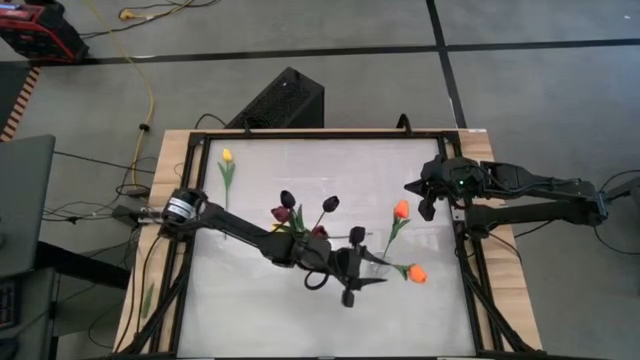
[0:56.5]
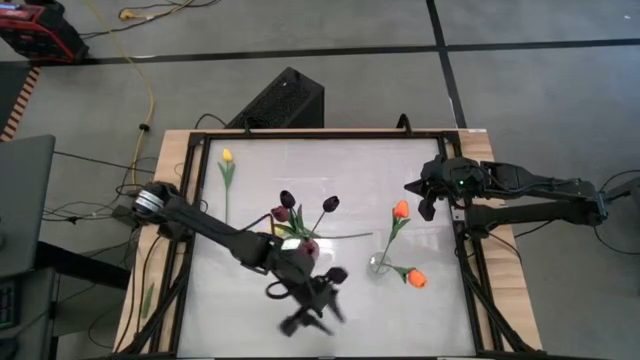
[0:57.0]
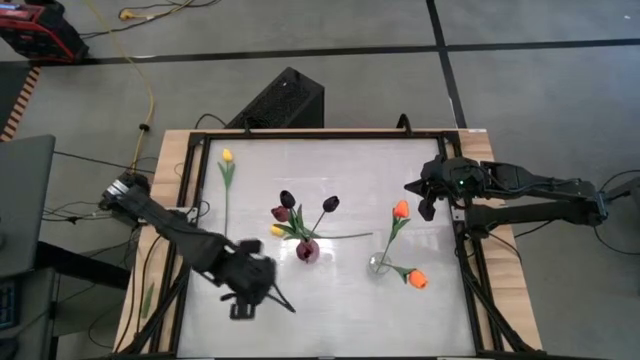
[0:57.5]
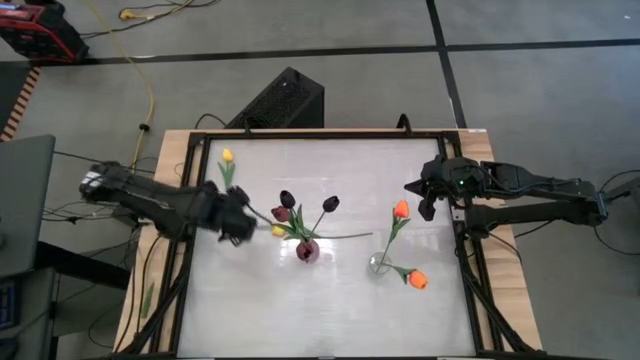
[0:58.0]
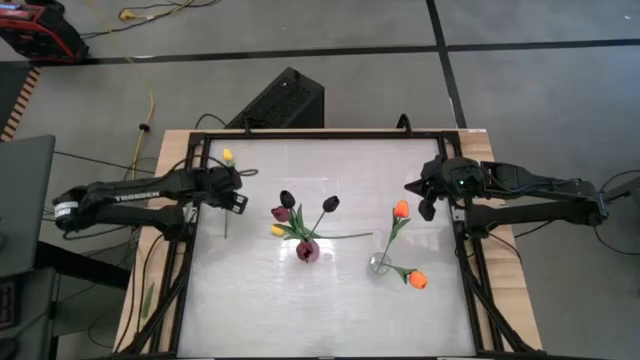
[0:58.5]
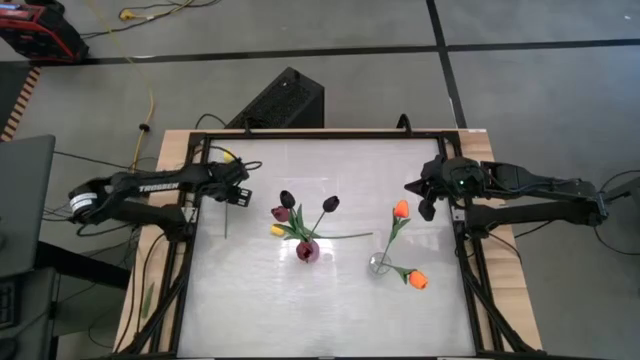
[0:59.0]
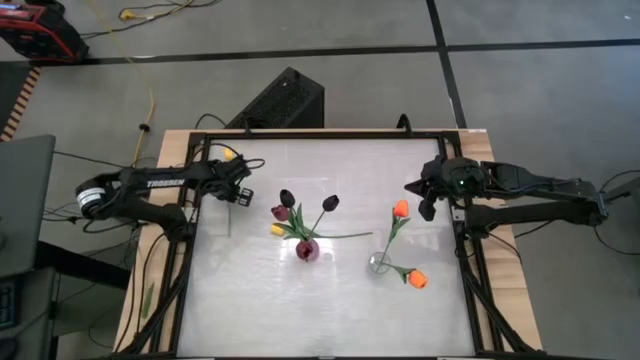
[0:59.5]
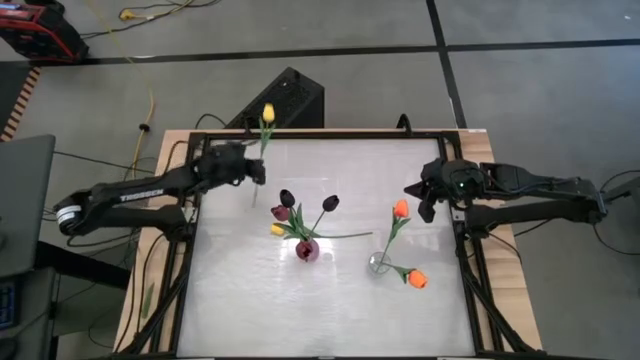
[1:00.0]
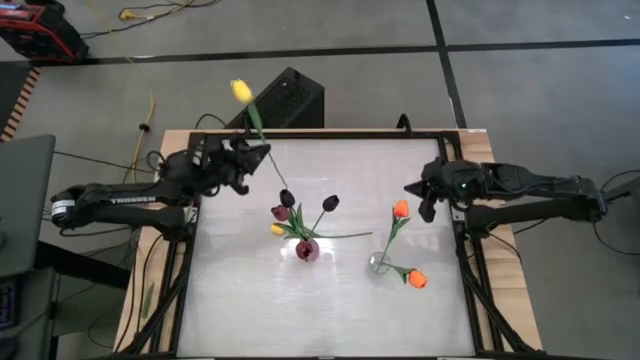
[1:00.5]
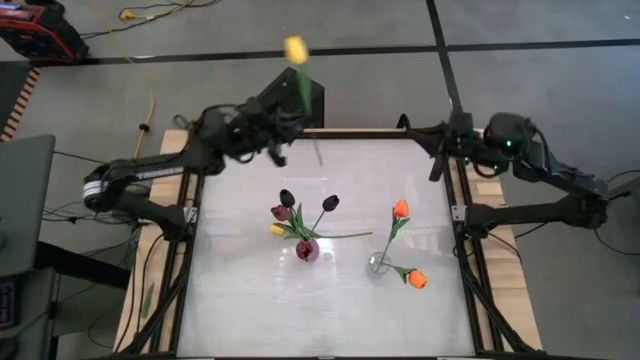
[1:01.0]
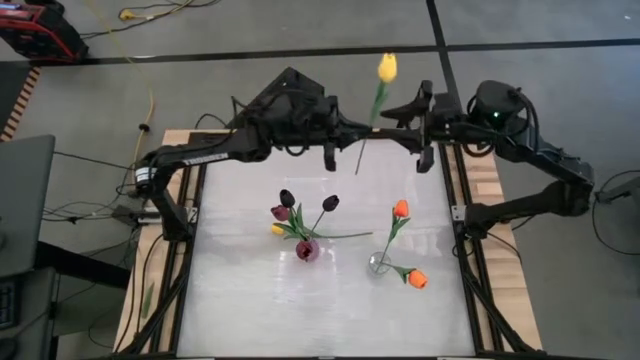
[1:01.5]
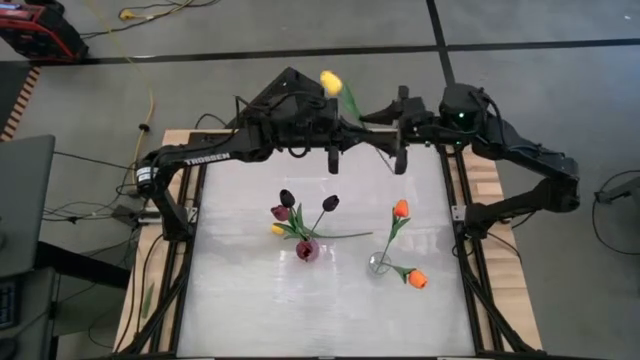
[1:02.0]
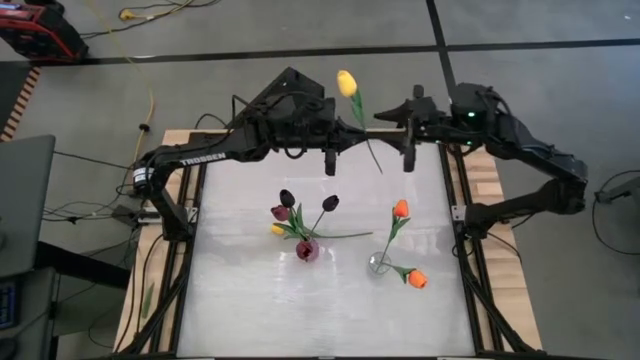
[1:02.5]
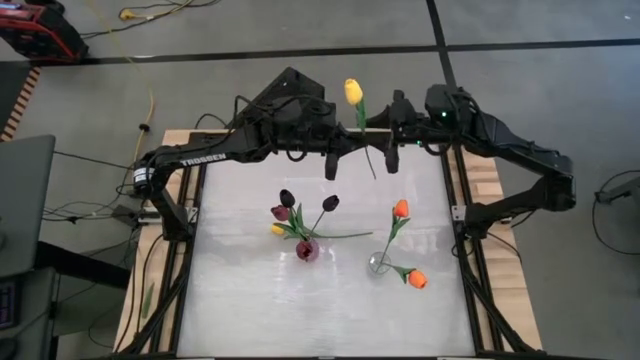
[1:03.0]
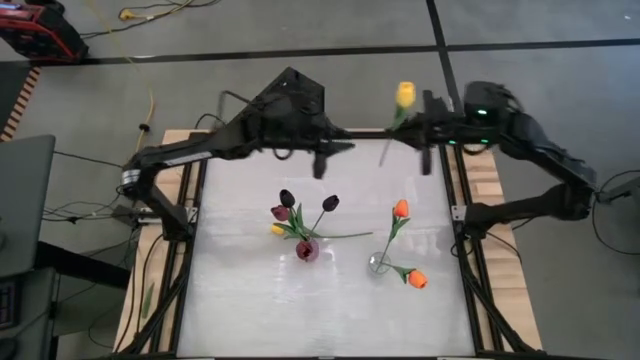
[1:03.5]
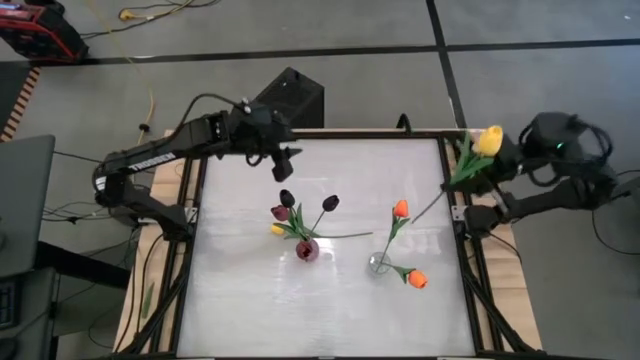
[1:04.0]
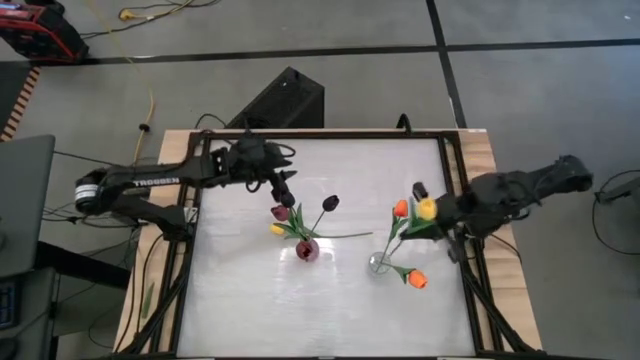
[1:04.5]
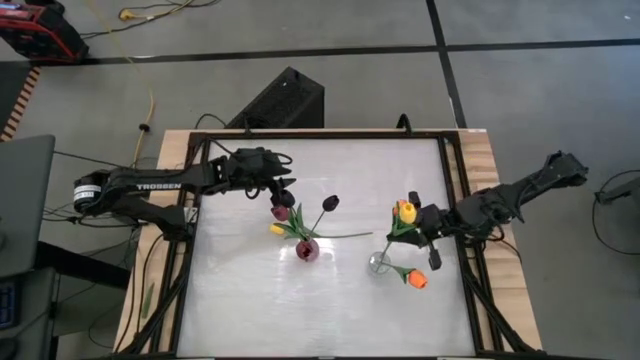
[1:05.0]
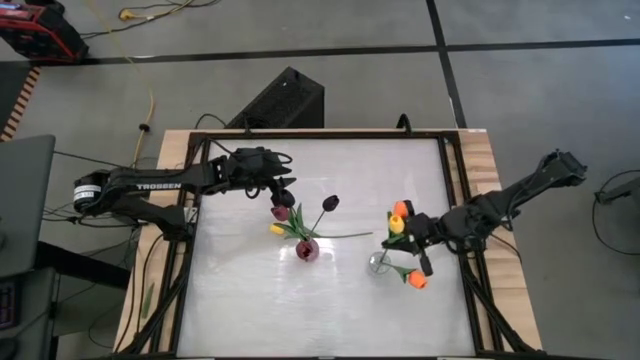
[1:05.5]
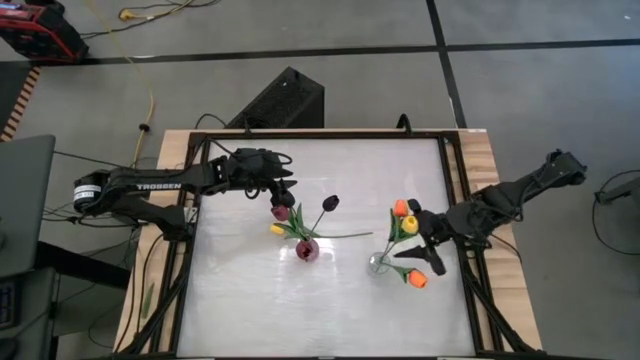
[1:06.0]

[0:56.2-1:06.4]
Task: Sort flowers into vase by color
Put the left yellow flower into the transparent vase

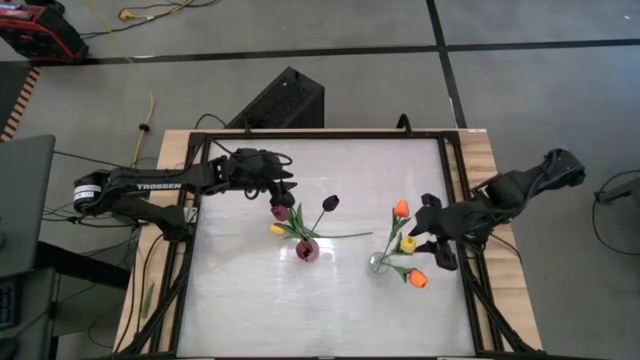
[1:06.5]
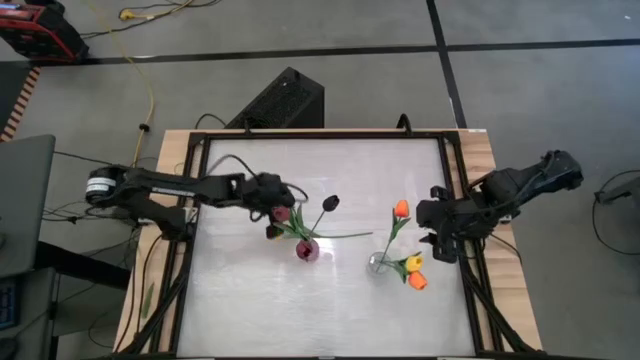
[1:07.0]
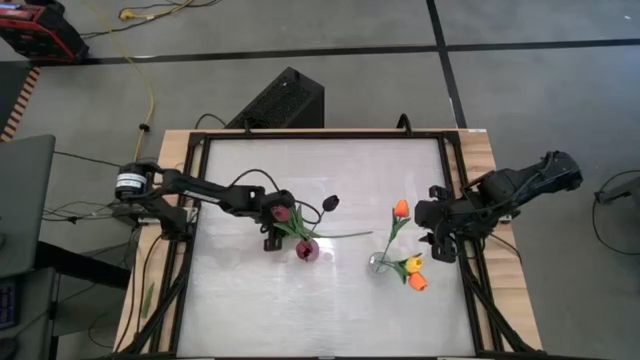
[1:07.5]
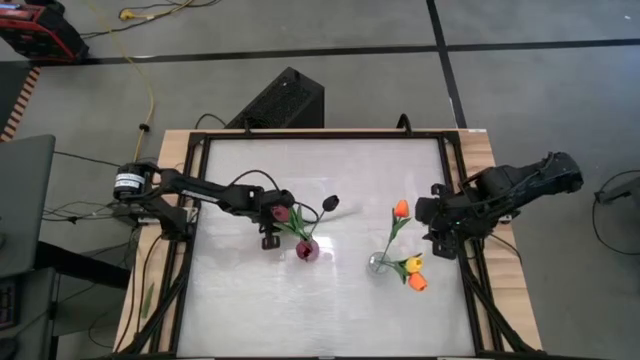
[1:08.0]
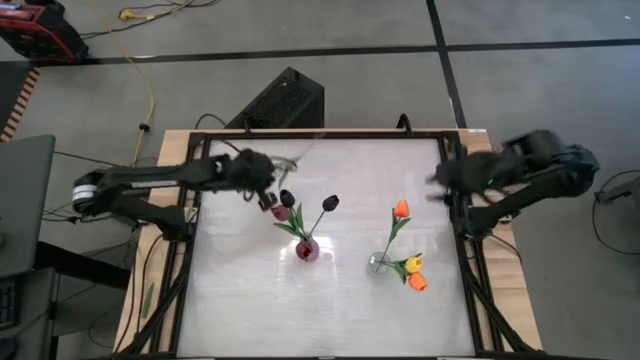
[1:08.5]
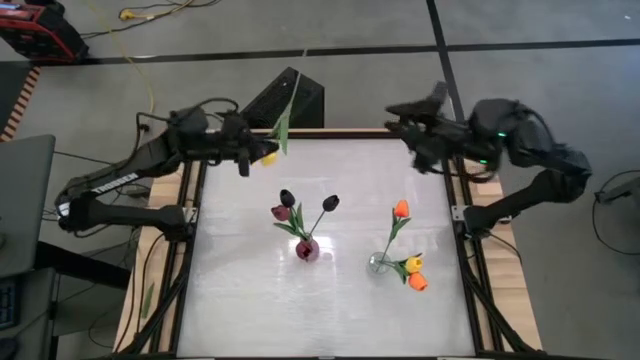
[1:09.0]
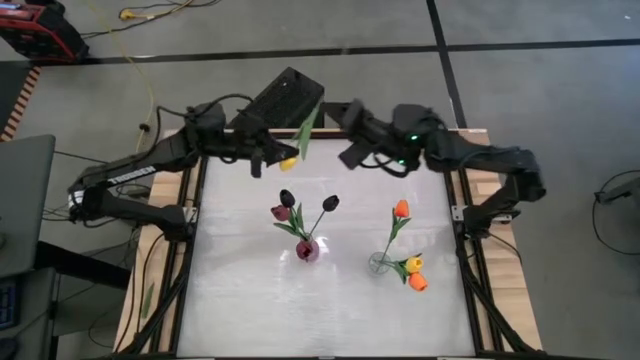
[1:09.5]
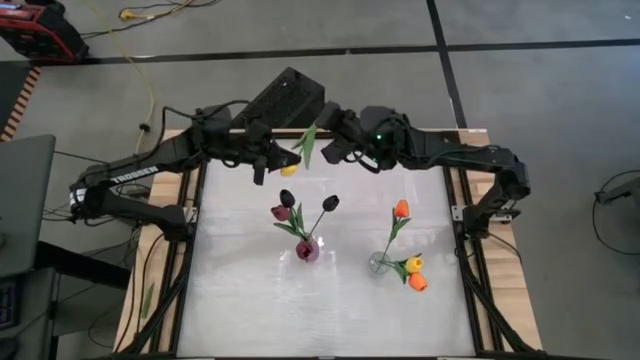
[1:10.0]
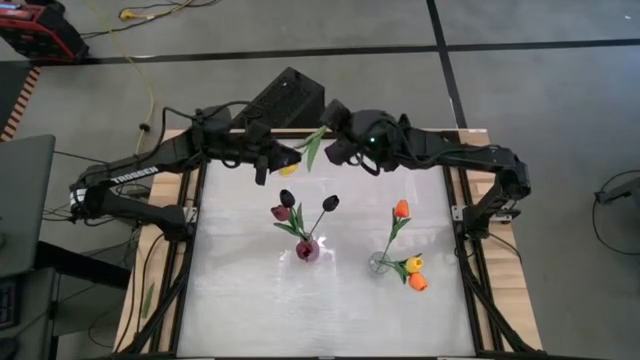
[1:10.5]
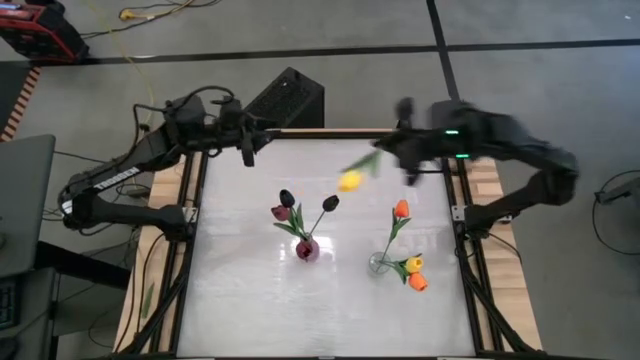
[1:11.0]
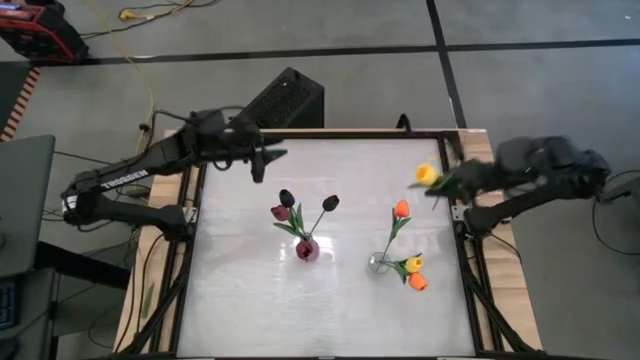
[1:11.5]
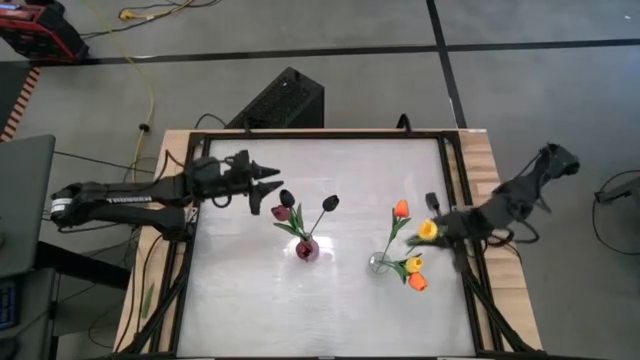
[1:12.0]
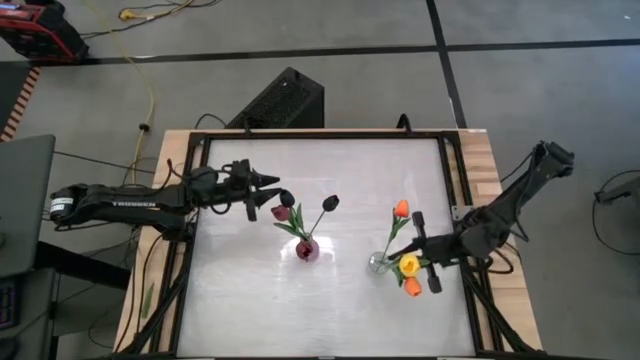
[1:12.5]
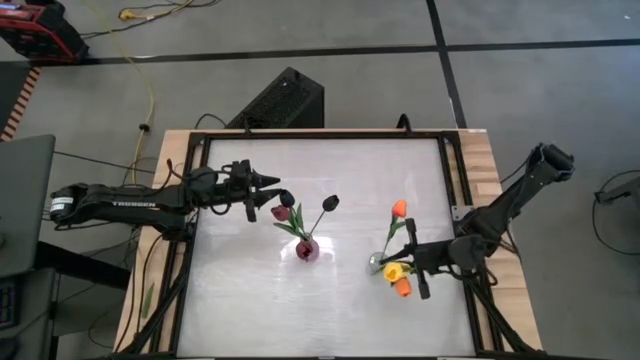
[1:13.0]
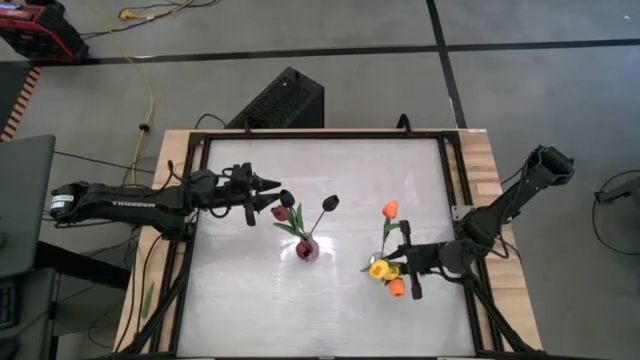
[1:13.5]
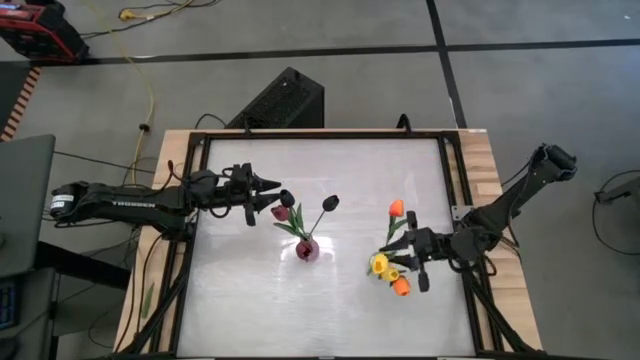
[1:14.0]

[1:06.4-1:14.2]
Put the yellow flower into the transparent vase

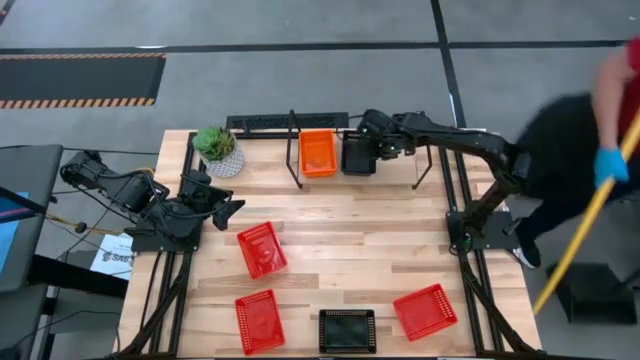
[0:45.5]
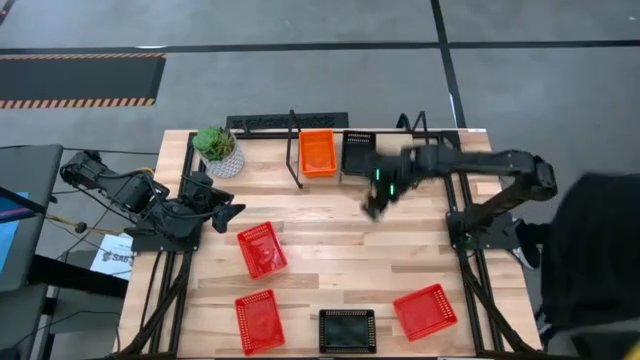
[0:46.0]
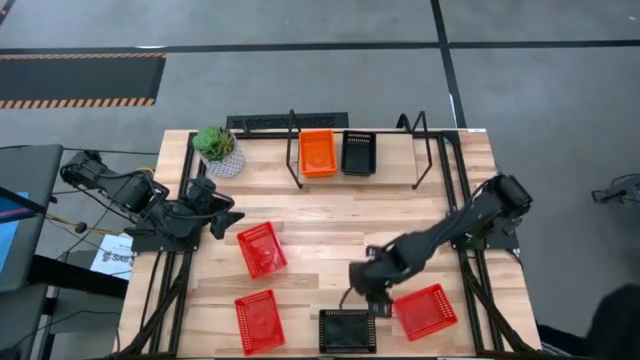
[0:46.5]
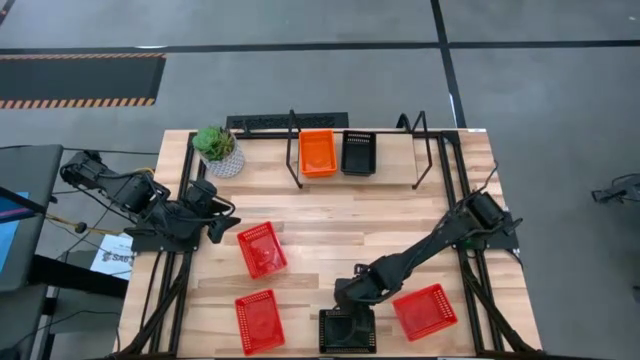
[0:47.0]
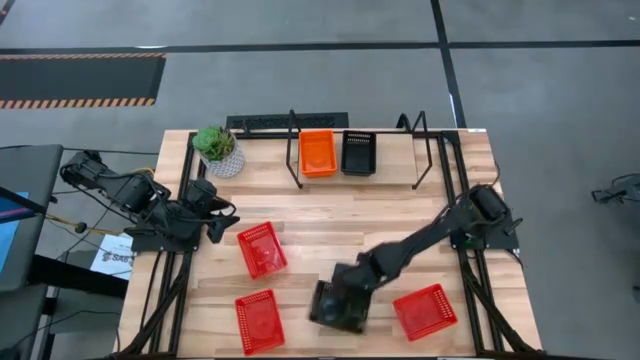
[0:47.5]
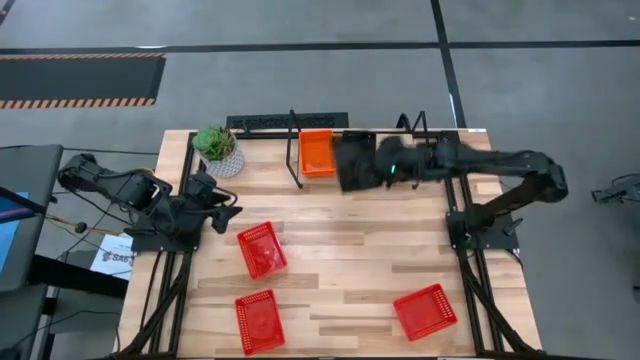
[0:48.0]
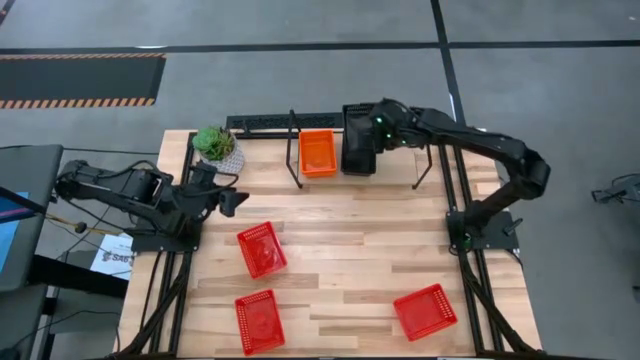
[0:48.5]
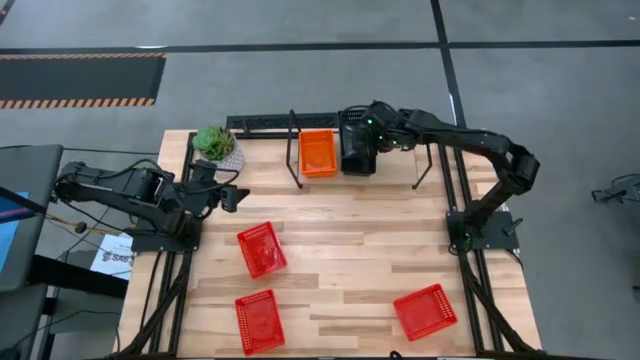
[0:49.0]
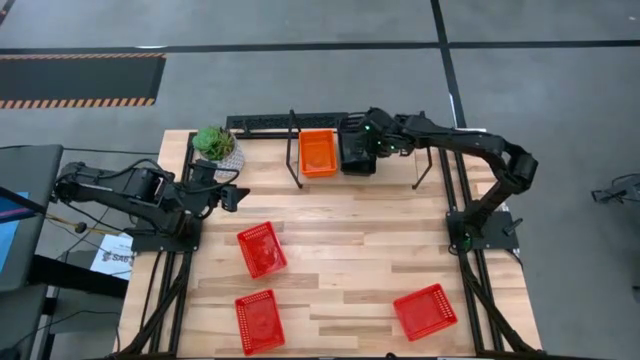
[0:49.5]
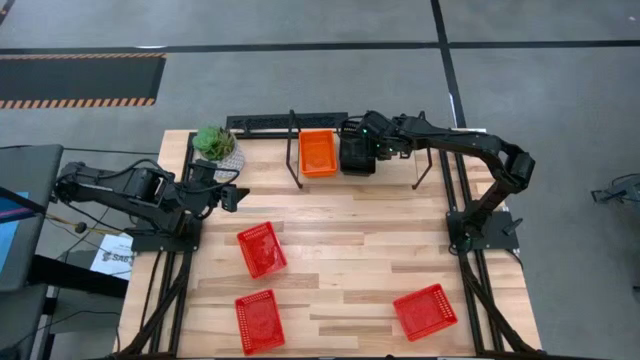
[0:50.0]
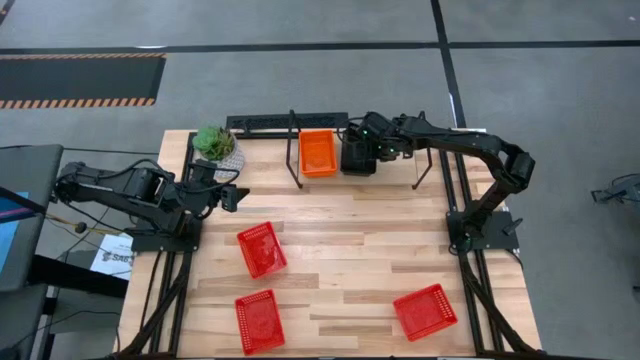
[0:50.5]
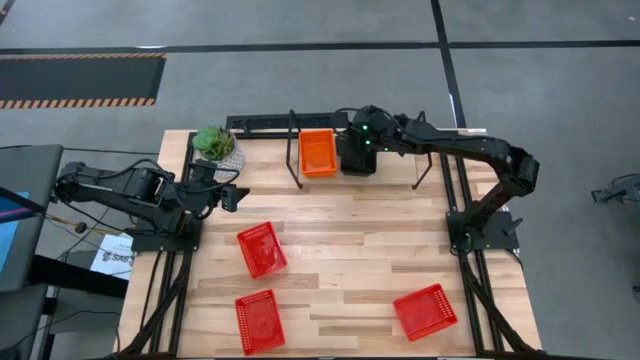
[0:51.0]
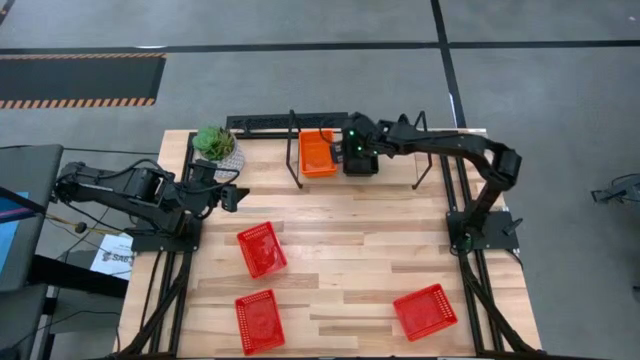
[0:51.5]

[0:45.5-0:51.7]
Task: Stack baskets on shelf by color
Stack the black bin on top of the black stacked bins on the shelf
